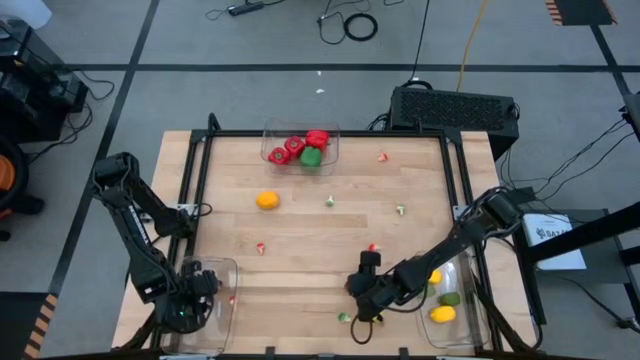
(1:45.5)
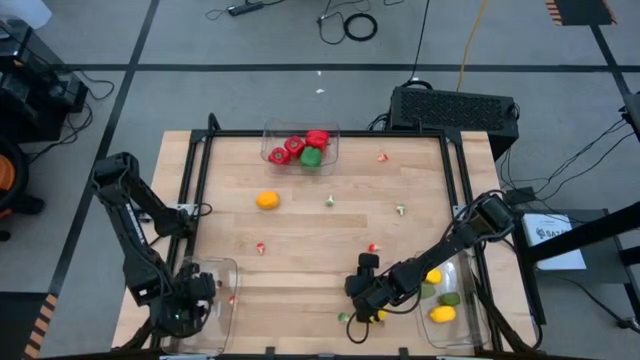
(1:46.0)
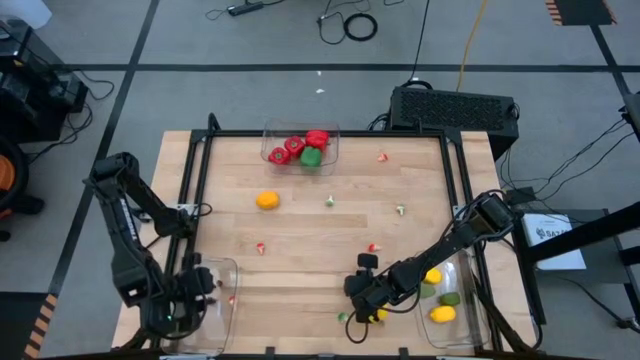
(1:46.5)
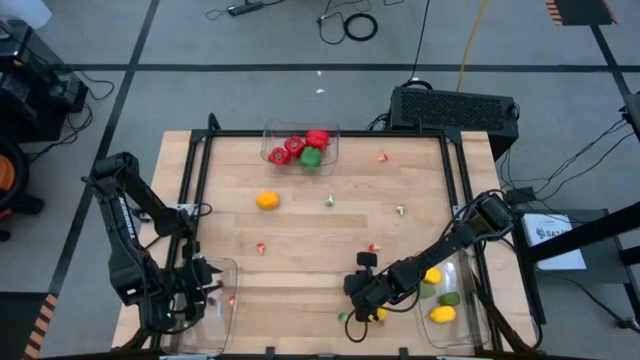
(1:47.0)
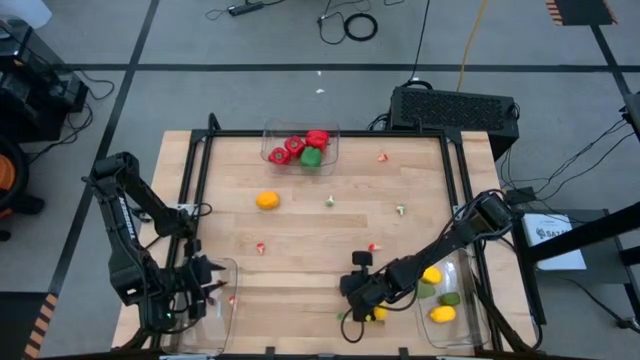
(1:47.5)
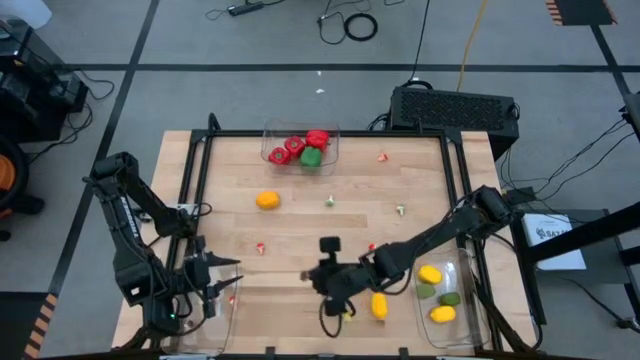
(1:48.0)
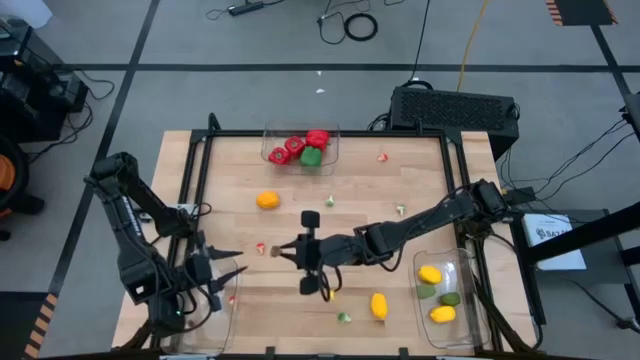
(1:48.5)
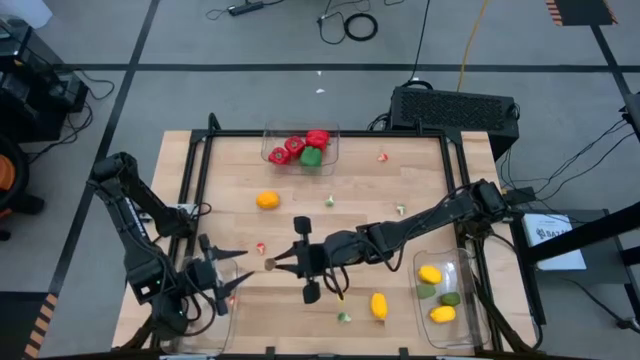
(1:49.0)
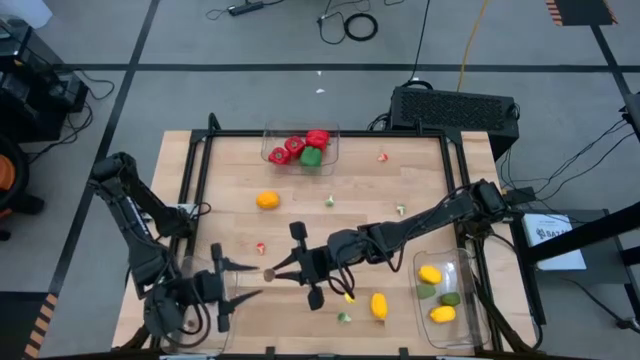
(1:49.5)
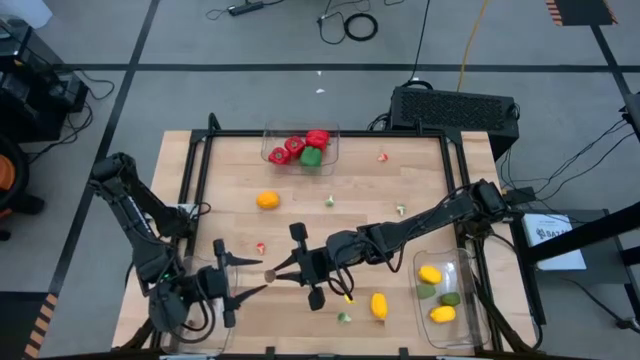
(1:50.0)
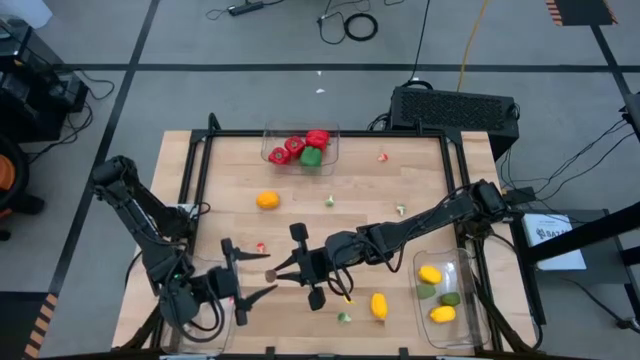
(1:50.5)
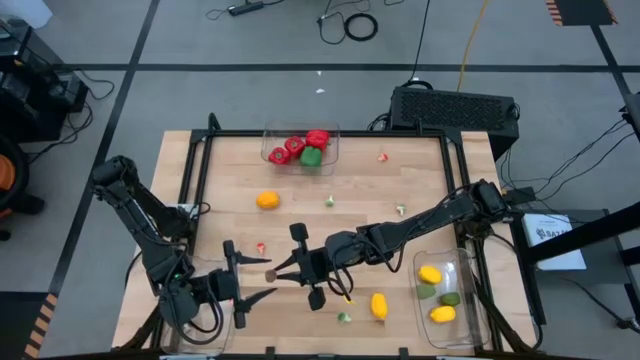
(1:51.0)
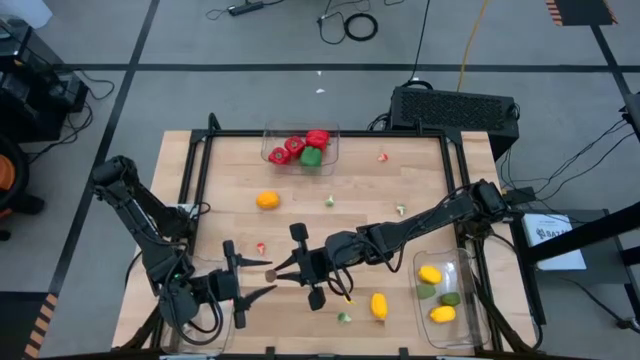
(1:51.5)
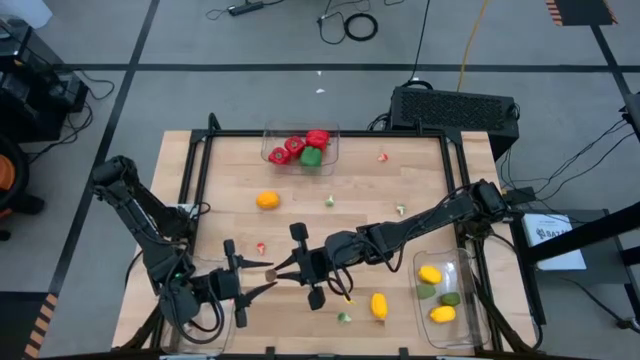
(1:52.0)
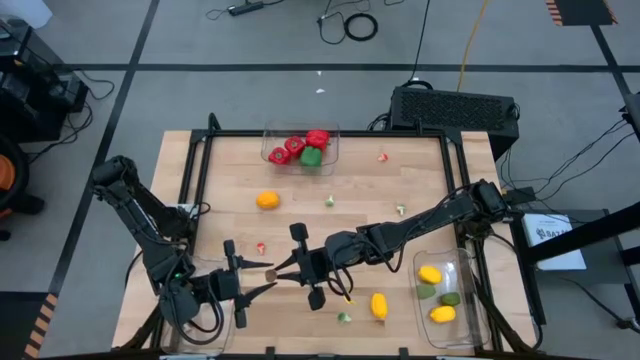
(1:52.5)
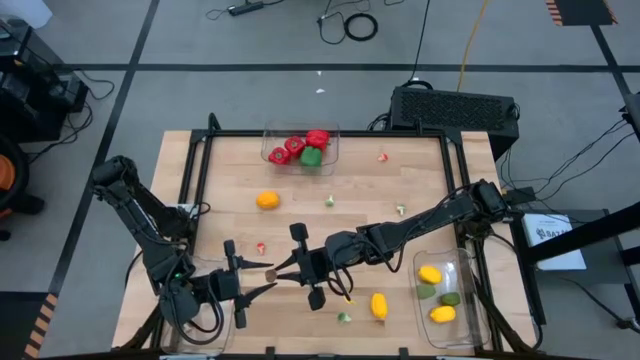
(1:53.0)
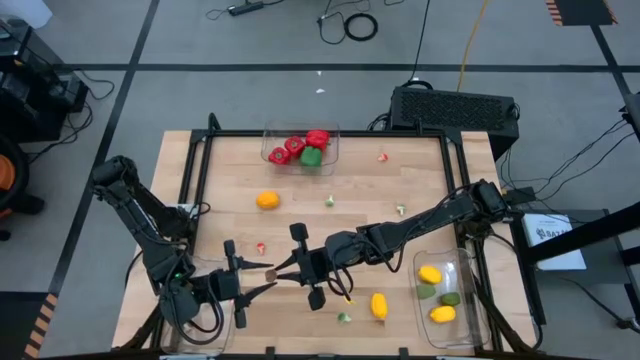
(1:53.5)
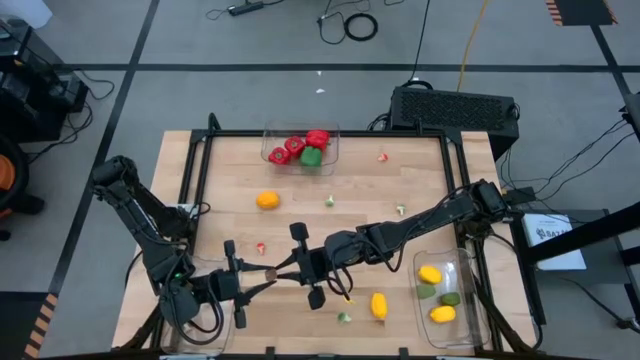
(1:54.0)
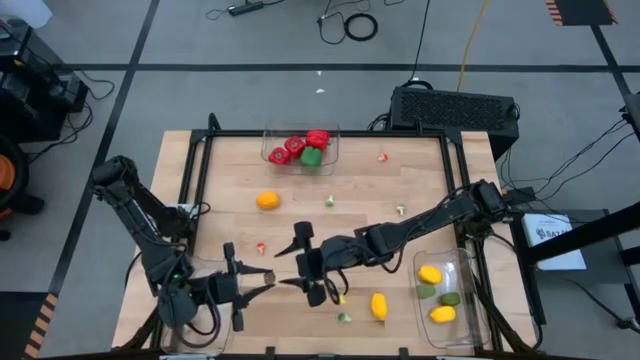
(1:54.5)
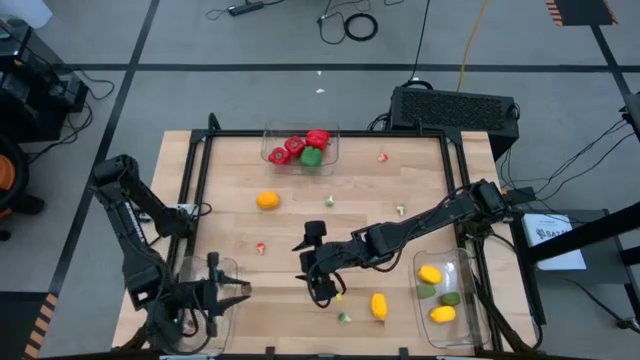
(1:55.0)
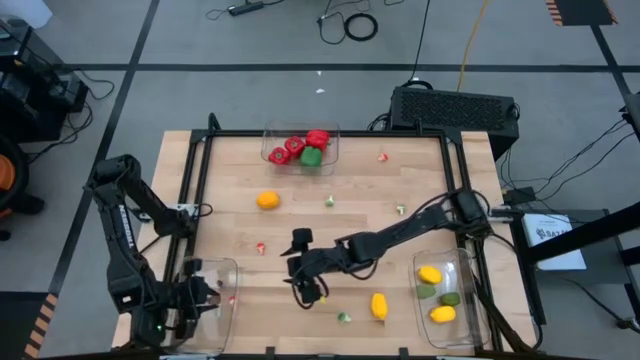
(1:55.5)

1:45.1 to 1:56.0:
Task: Sort produce into baskets
Put the brown mushroom into the bottom left transparent bin

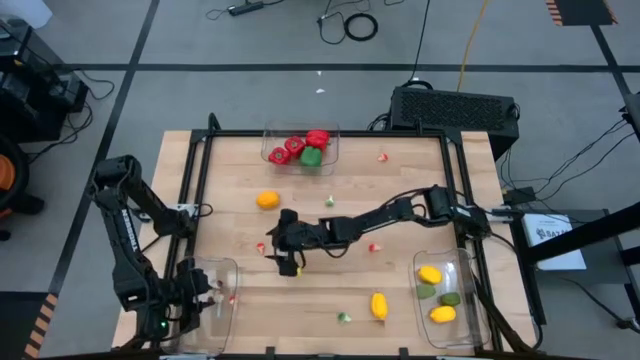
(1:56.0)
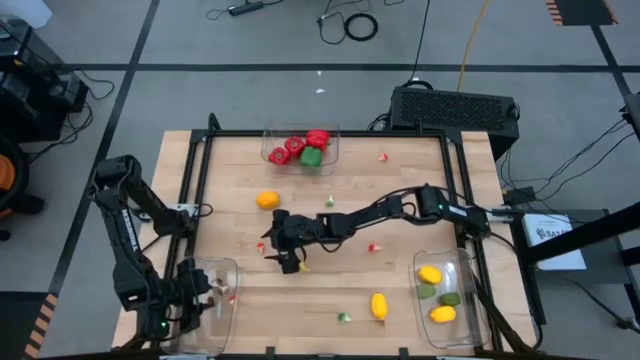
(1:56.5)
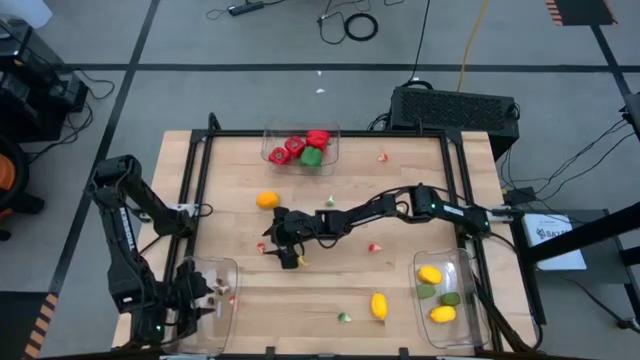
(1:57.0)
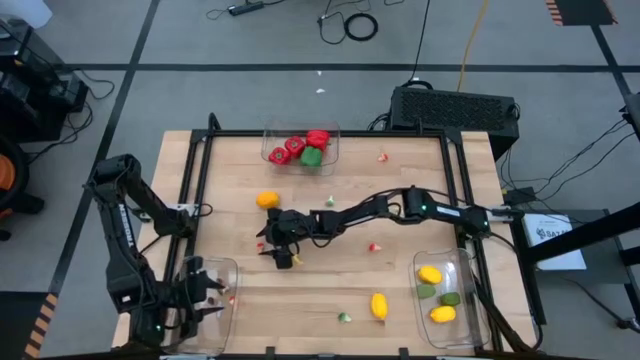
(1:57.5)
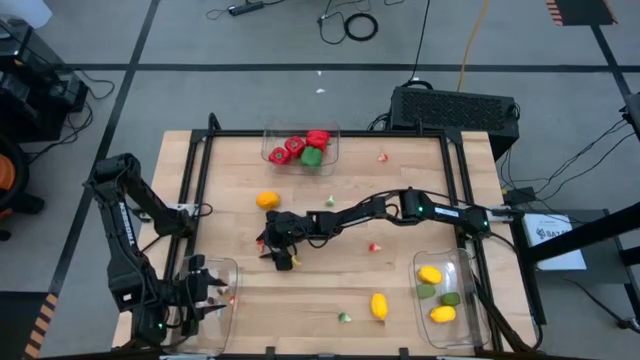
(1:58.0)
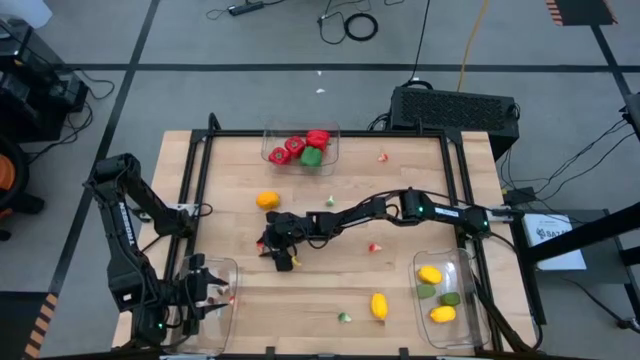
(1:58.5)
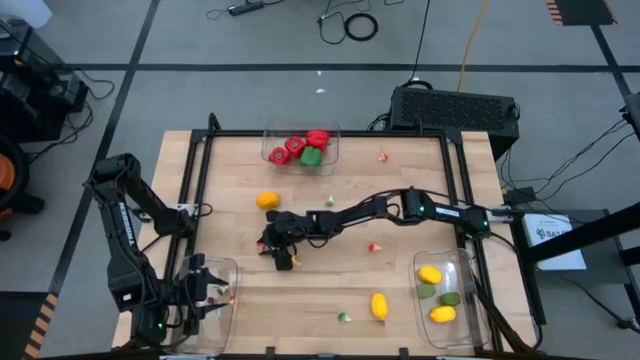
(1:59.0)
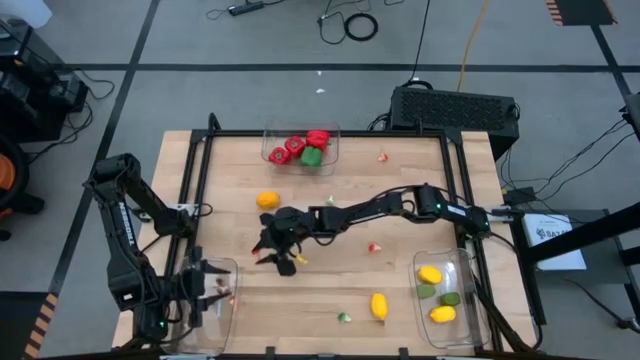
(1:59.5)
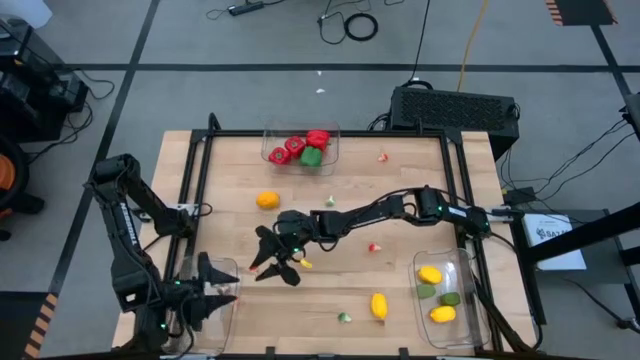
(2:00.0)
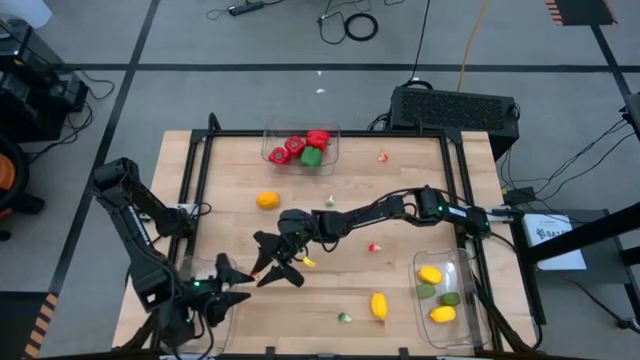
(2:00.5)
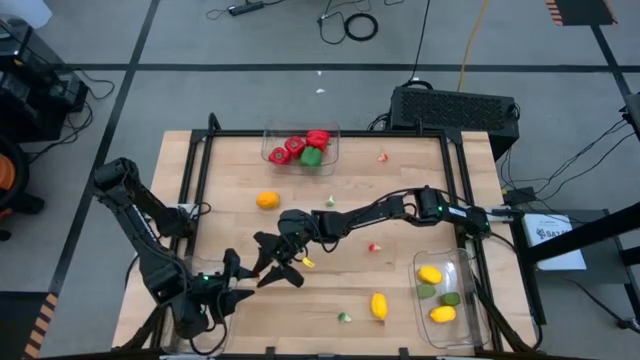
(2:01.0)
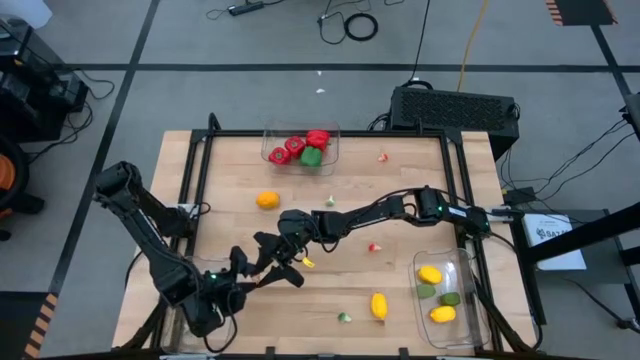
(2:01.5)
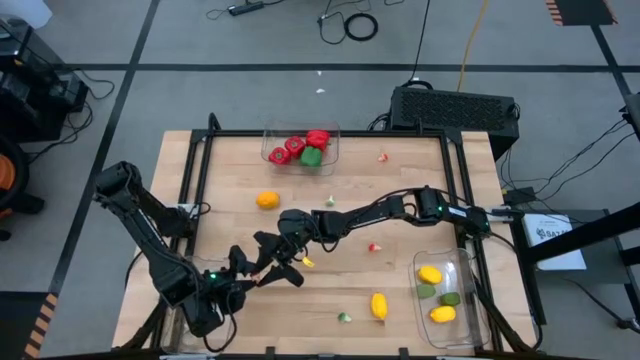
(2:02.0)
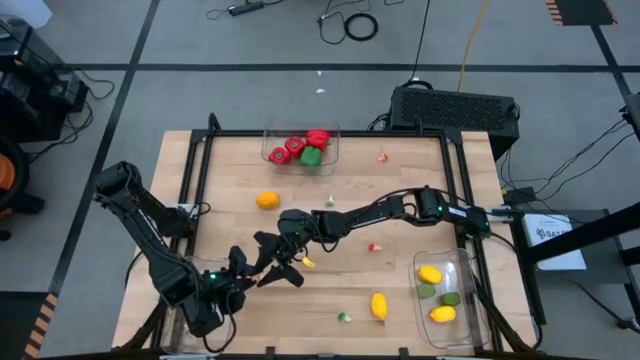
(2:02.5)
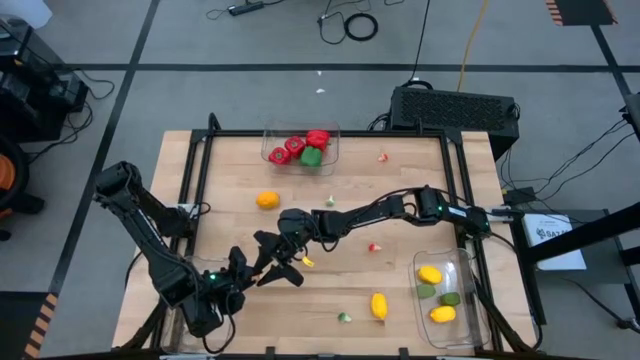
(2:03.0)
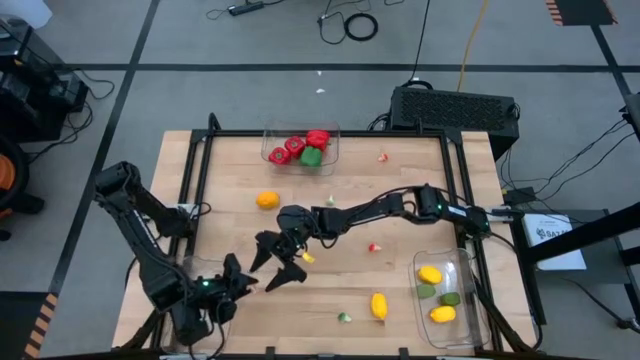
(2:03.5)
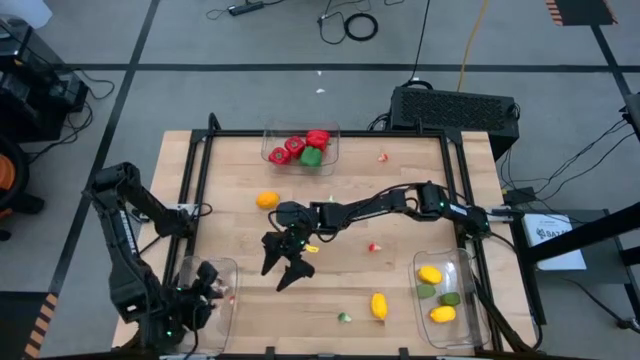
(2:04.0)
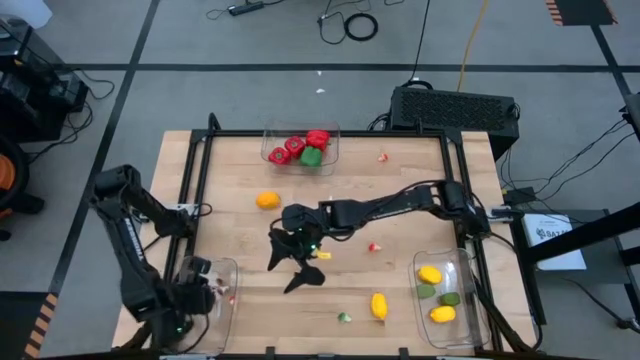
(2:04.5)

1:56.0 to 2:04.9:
Put the red mushroom into the bottom left transparent bin

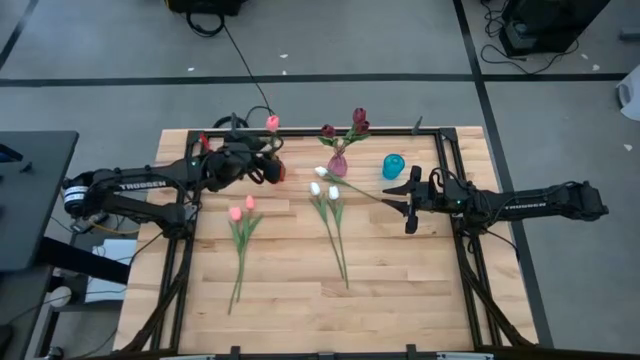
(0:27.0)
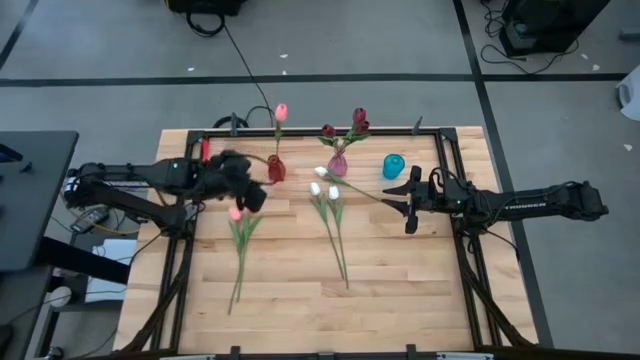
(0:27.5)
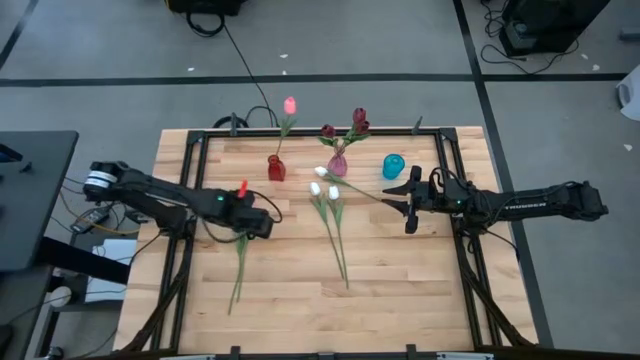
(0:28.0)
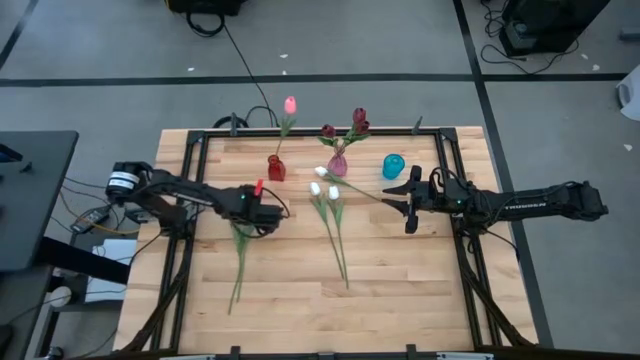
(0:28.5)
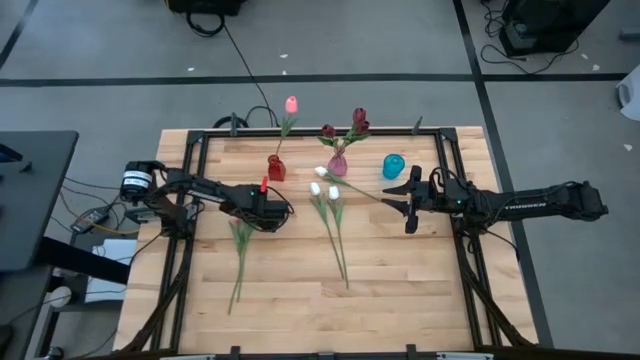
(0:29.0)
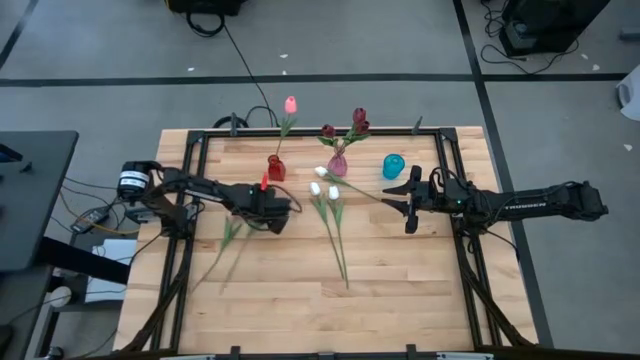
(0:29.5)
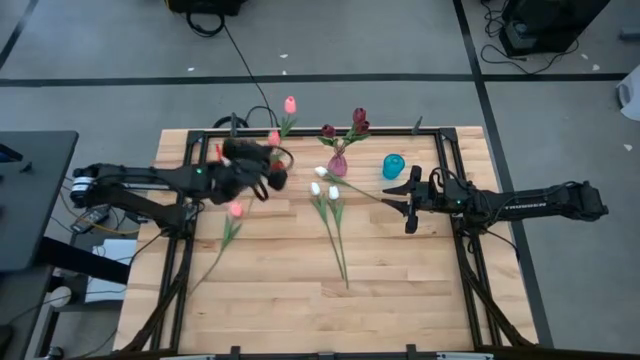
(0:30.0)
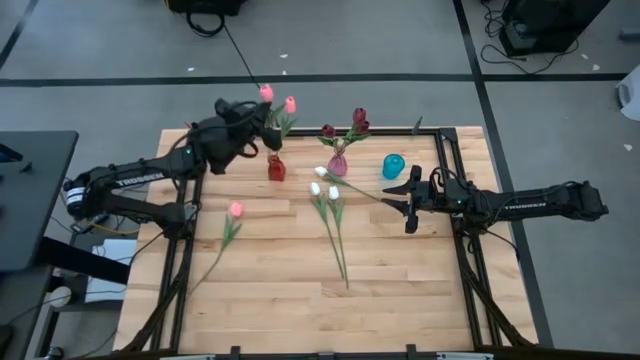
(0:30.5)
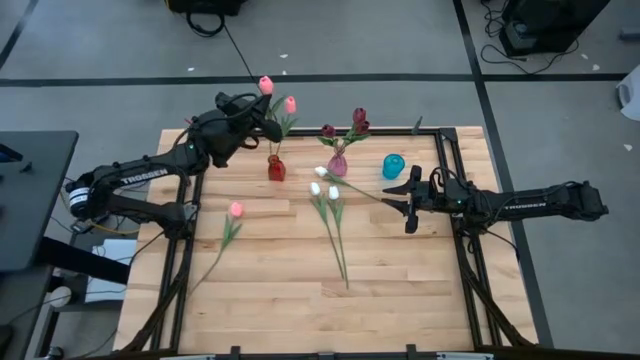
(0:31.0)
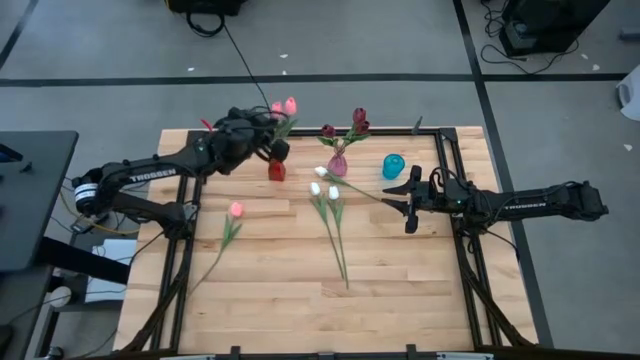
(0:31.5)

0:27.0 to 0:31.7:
Task: Sort flowers into vase by color
Put the right pink flower into the dark red vase
